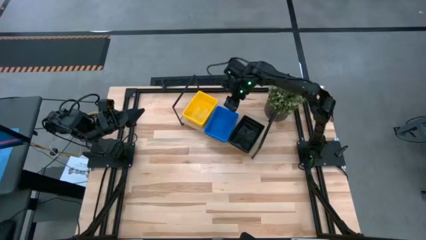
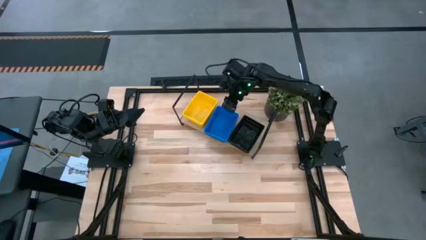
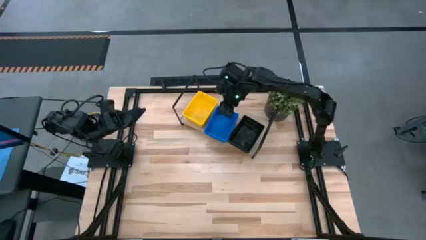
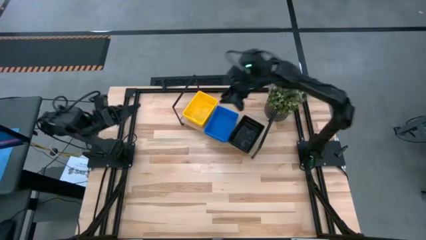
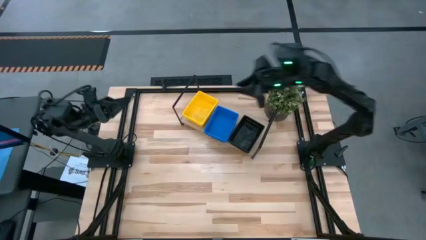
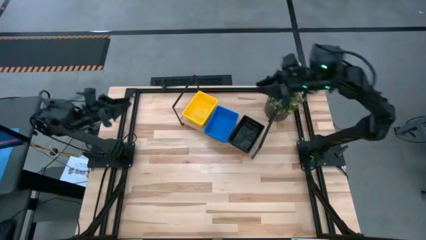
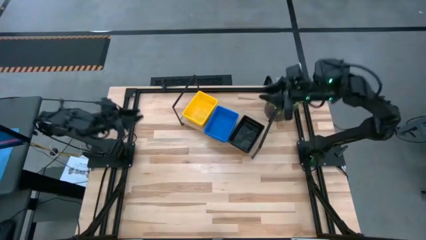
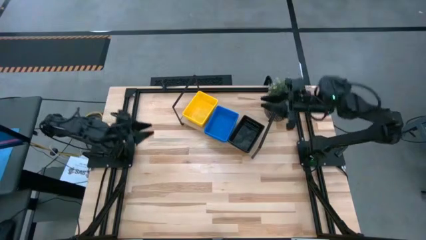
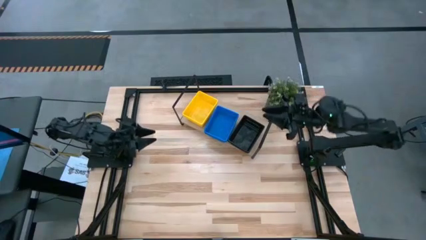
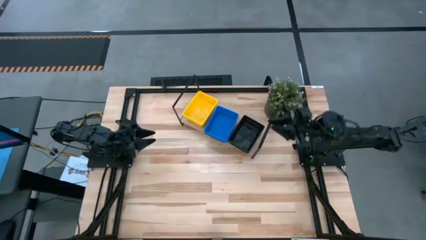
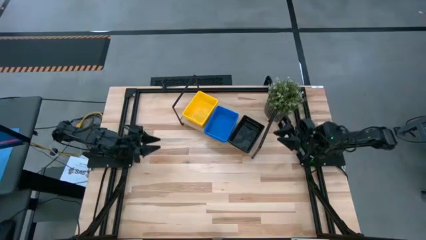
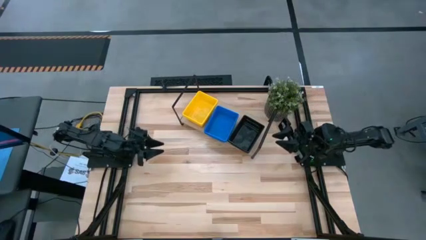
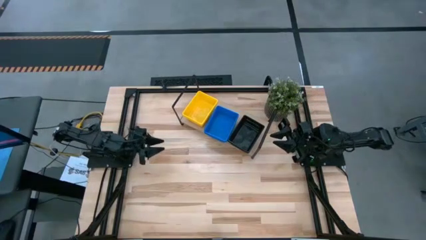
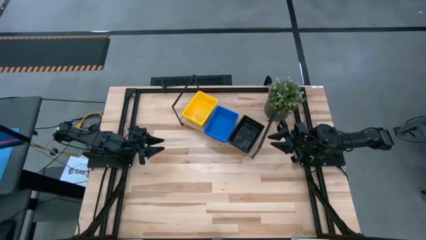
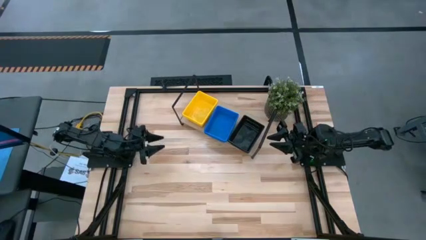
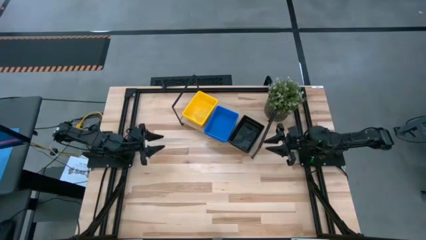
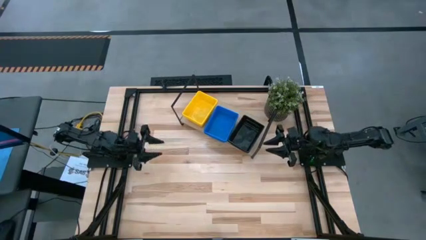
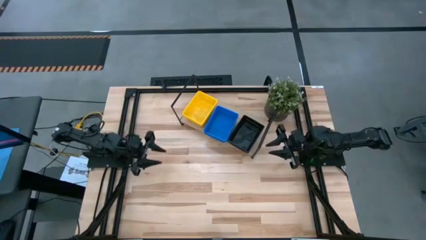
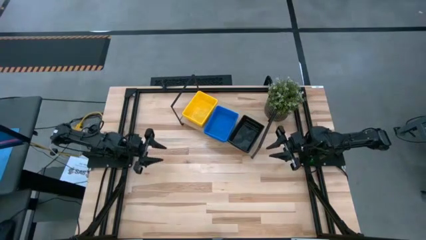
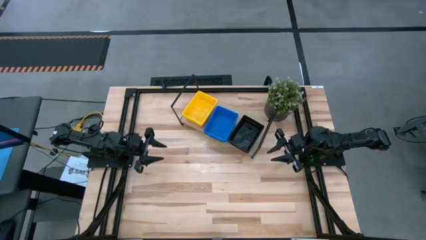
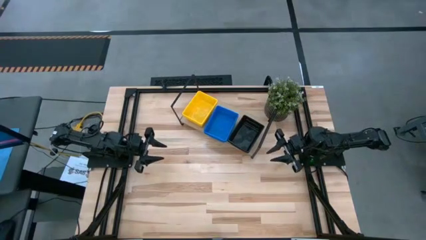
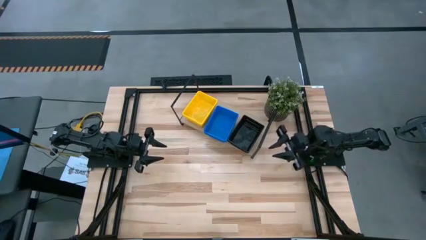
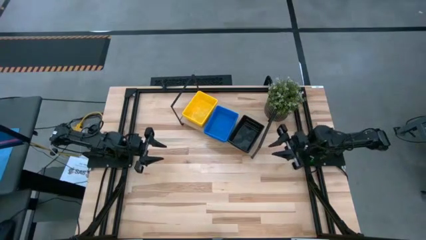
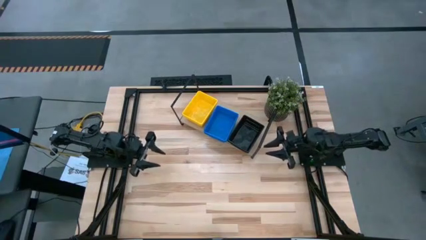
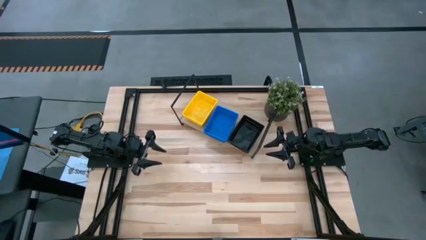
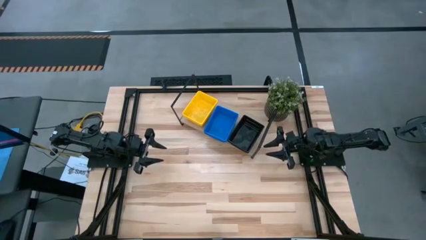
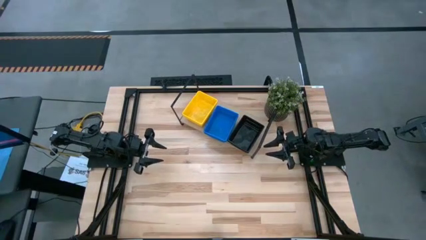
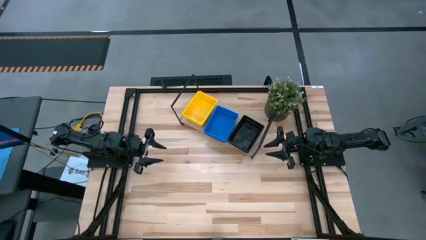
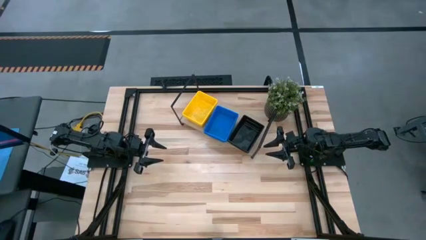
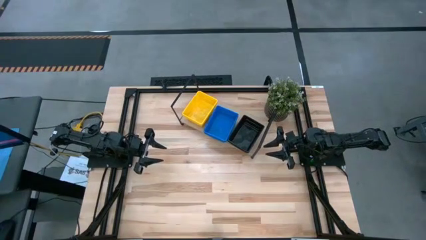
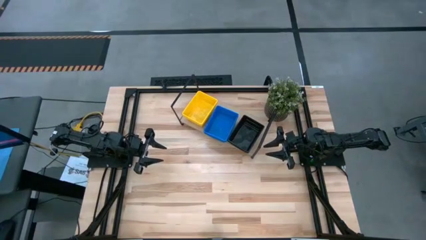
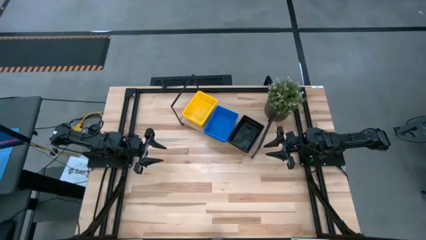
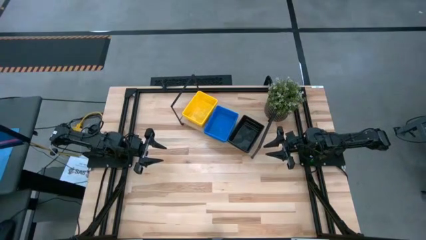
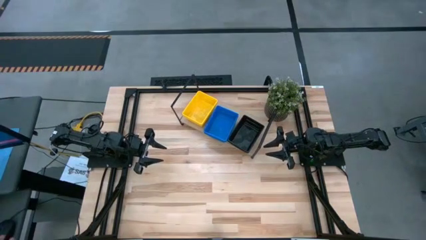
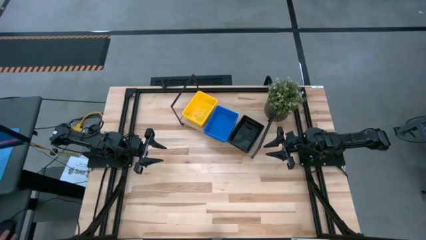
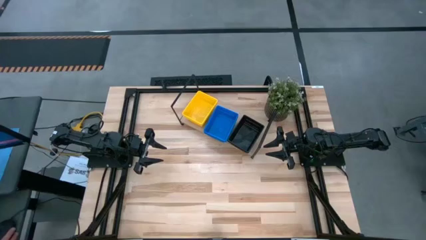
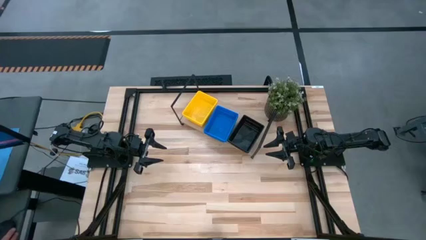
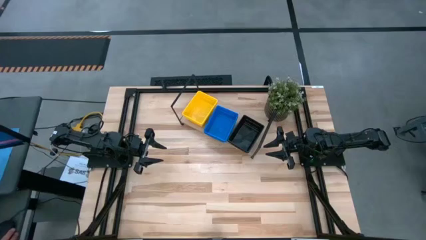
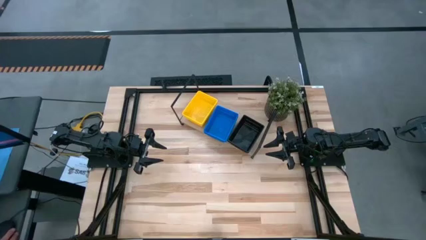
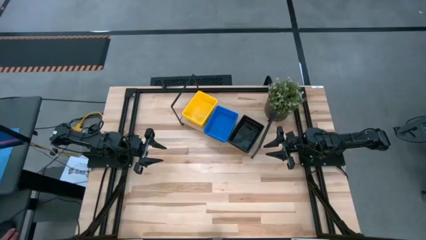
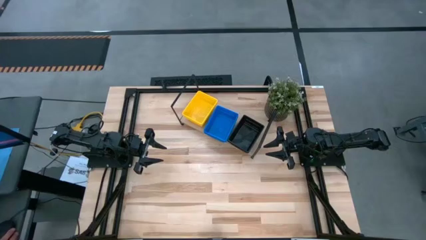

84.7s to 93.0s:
Task: Stack baskets on shelf by color
Return to Home Position

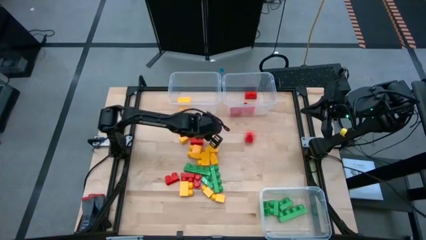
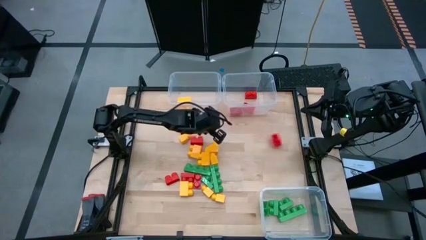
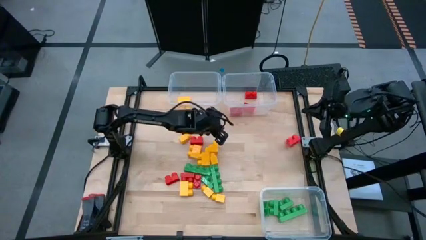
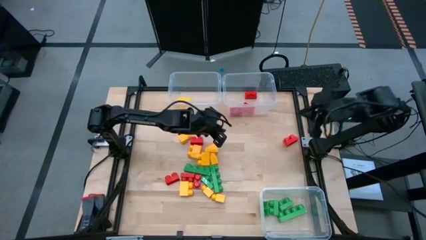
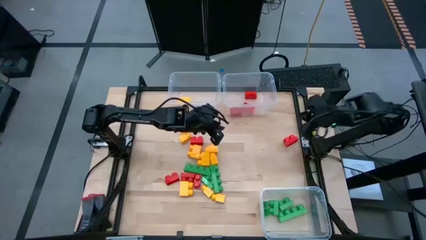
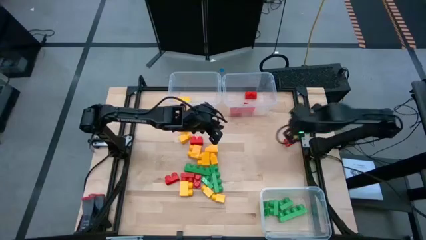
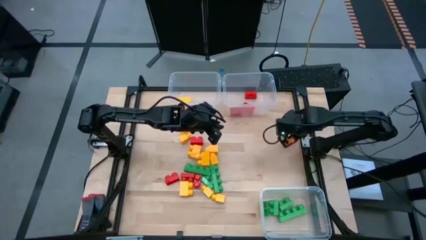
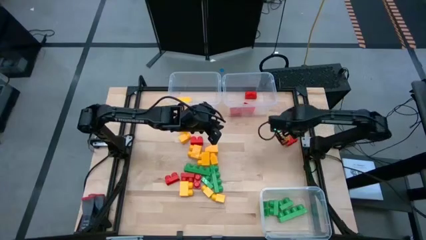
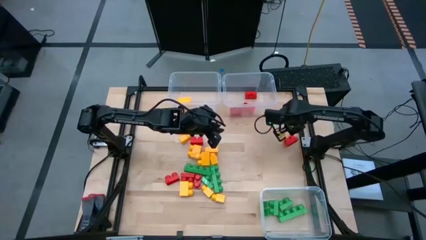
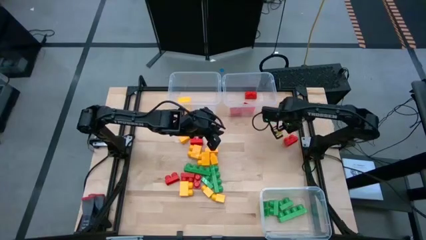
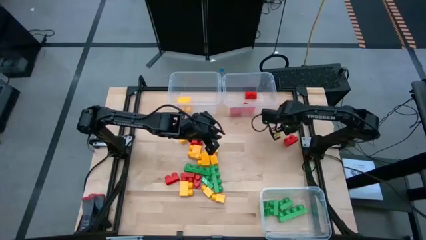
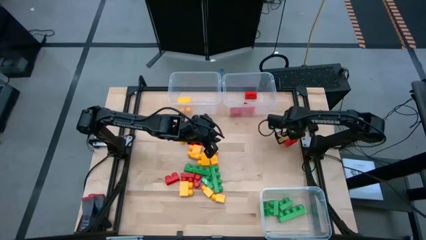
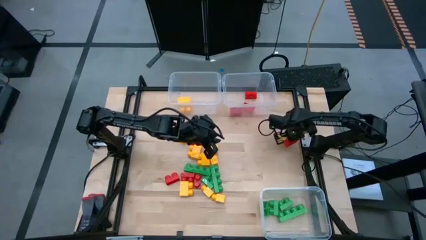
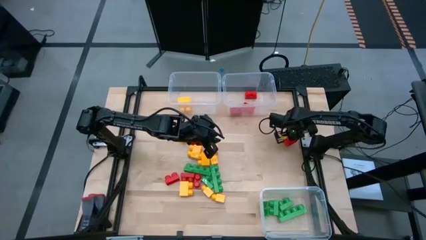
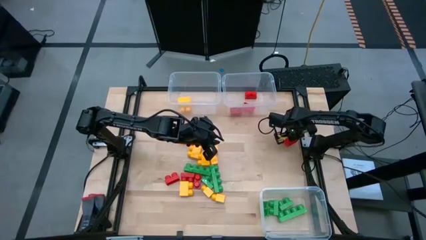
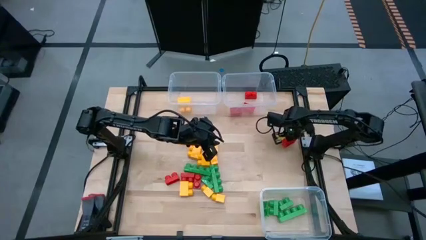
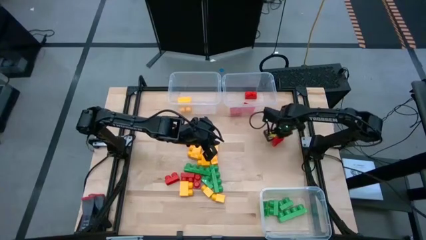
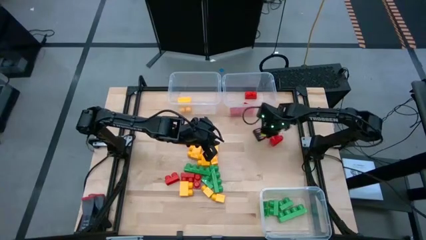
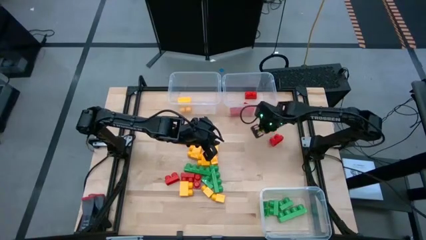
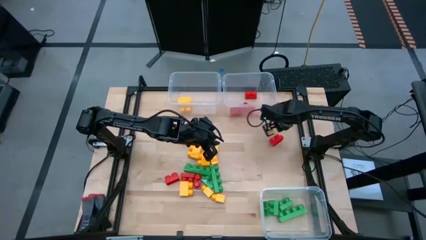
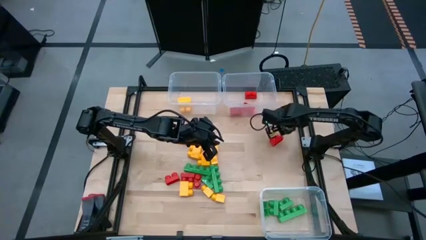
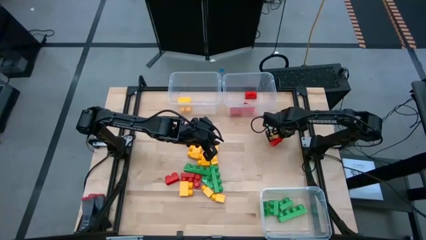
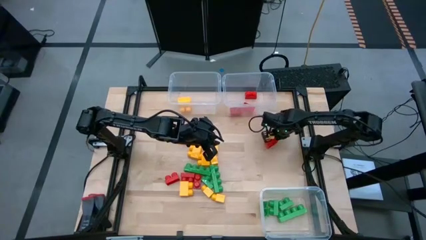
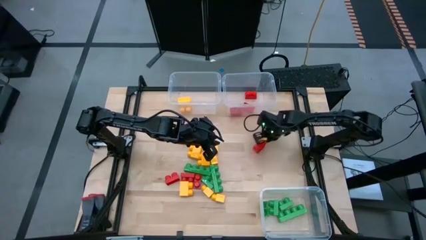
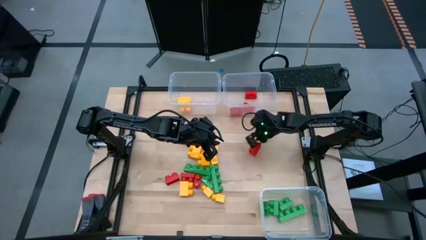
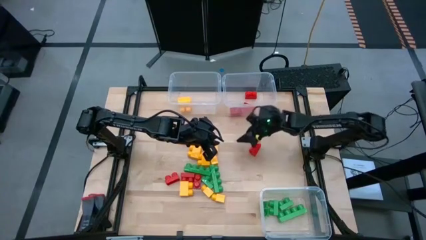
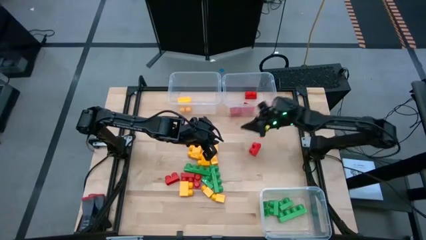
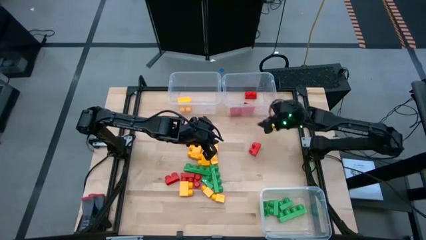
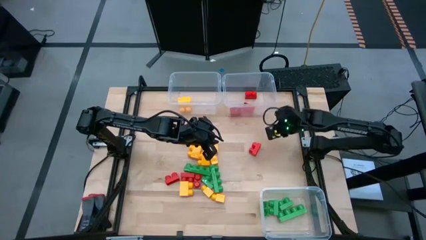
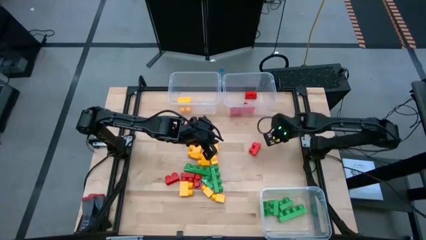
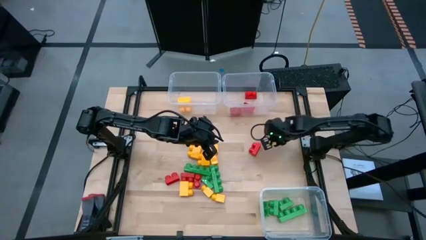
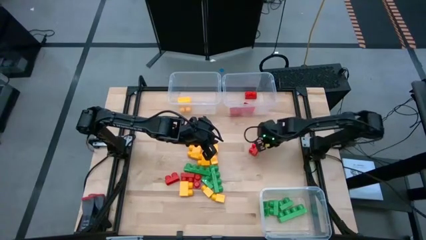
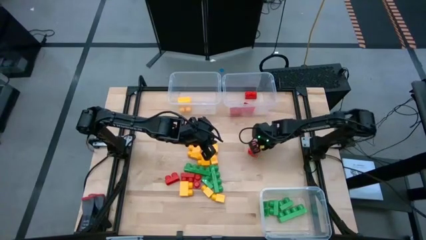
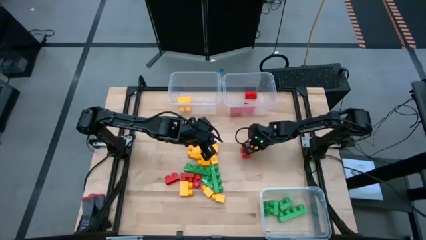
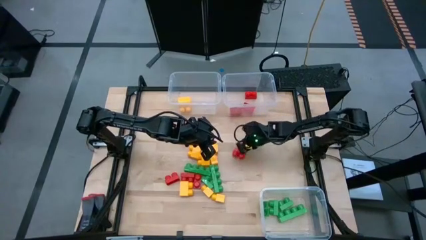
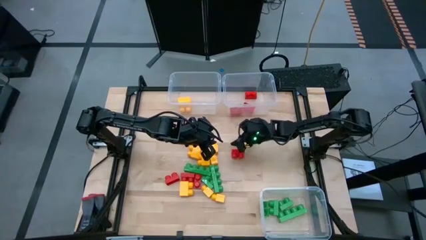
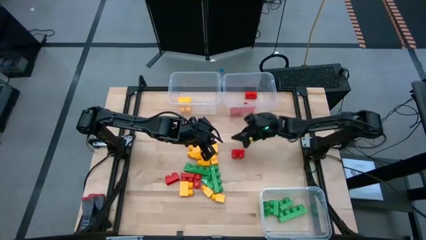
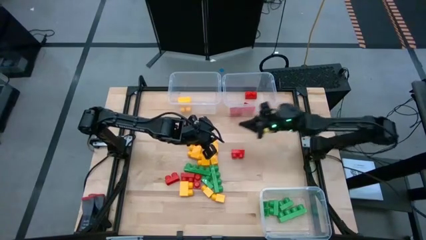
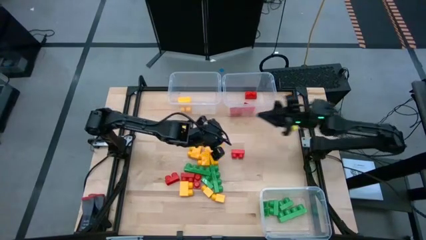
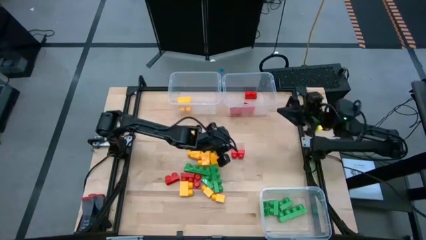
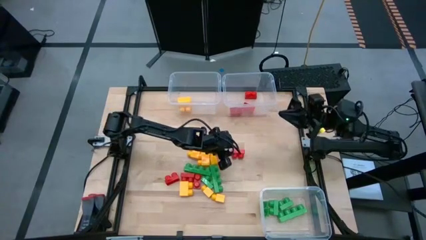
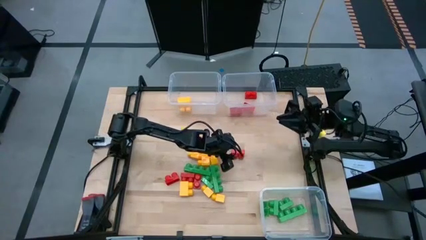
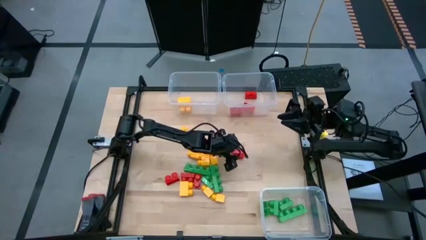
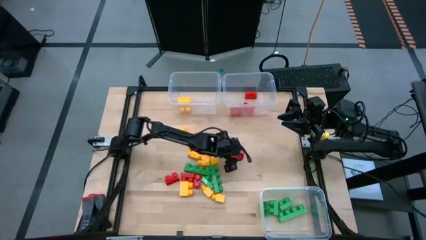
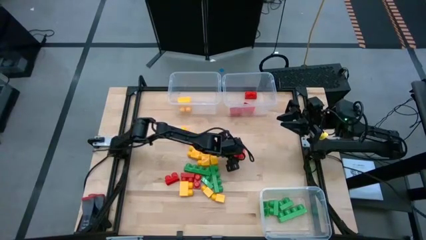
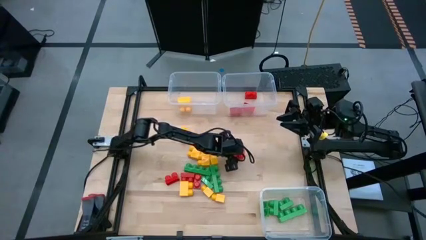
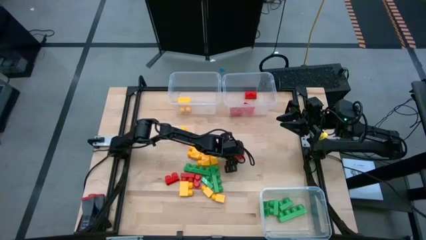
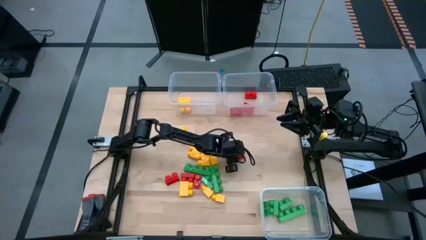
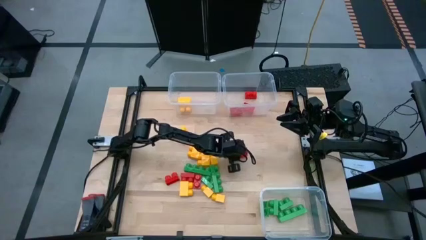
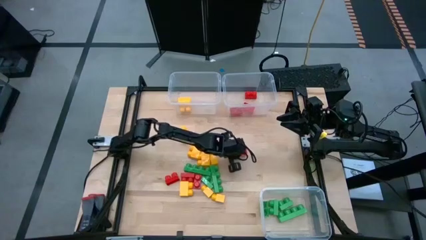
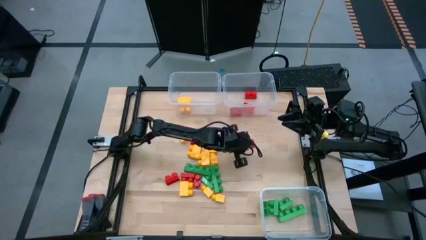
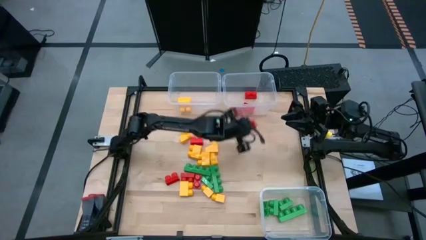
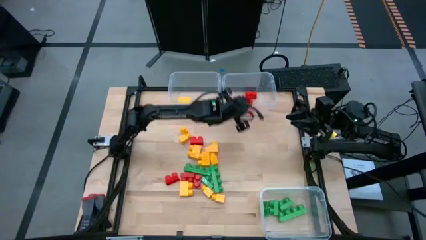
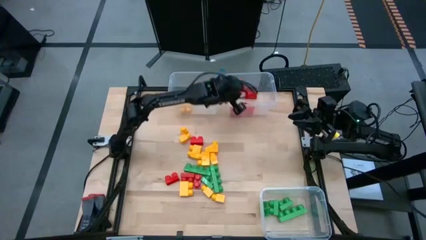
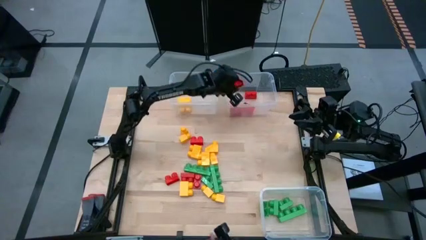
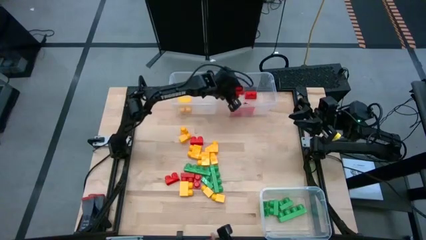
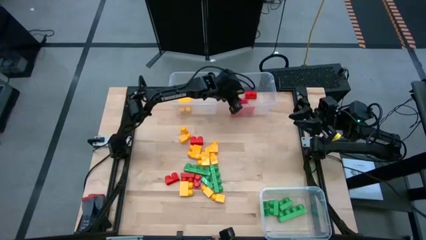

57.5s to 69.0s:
Task: Sort blocks
Put the red game piece into the top right transparent bin
